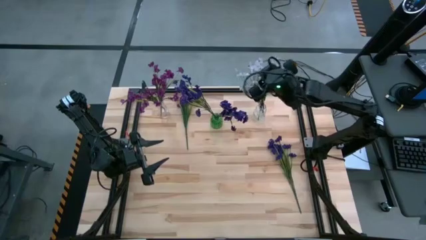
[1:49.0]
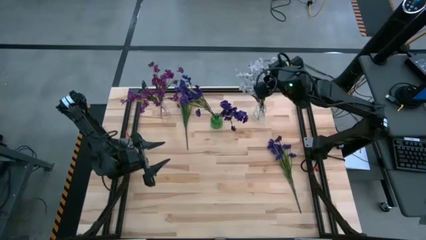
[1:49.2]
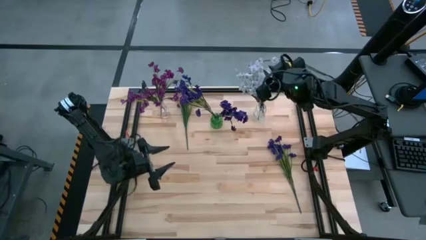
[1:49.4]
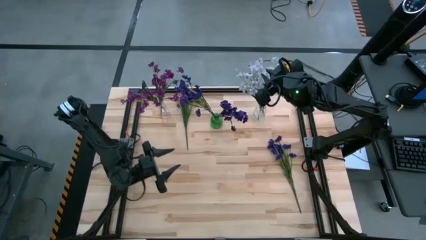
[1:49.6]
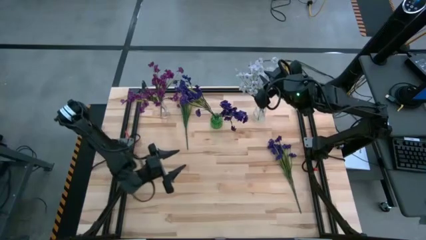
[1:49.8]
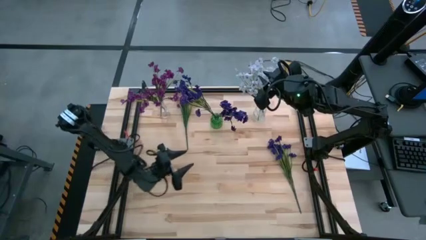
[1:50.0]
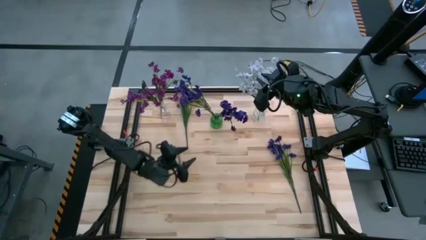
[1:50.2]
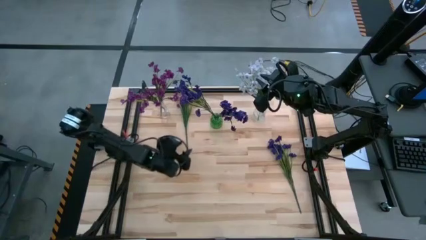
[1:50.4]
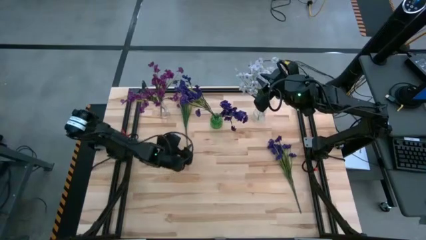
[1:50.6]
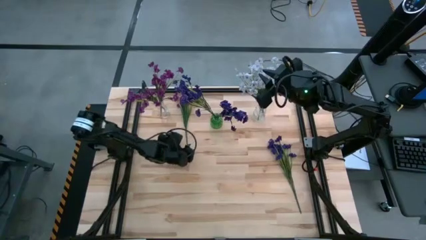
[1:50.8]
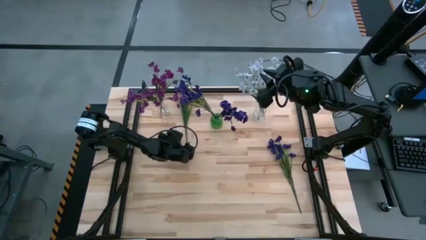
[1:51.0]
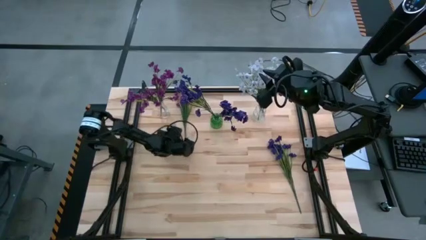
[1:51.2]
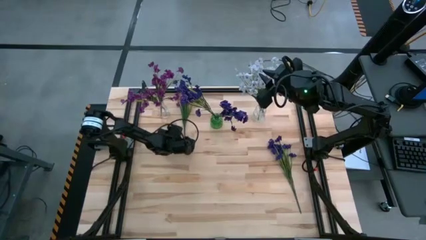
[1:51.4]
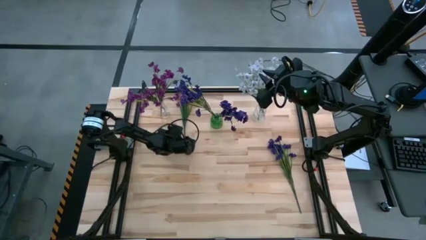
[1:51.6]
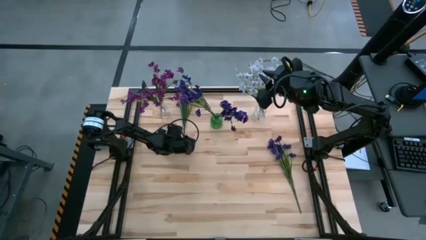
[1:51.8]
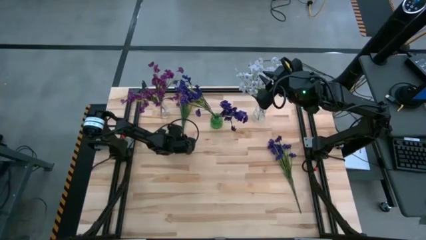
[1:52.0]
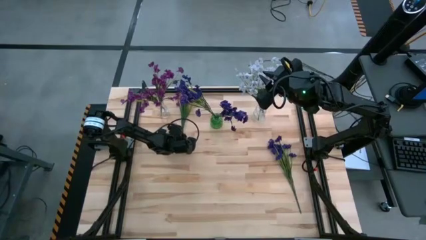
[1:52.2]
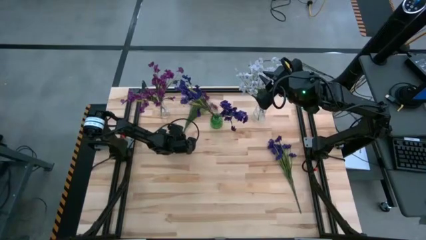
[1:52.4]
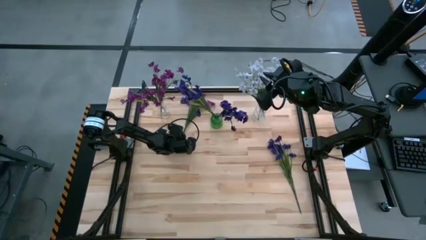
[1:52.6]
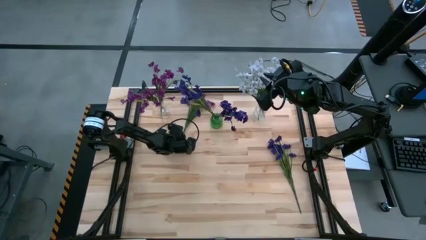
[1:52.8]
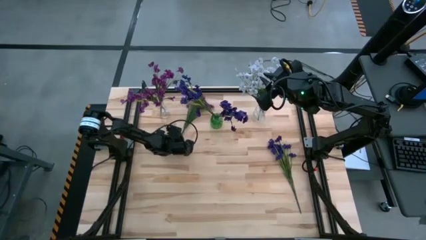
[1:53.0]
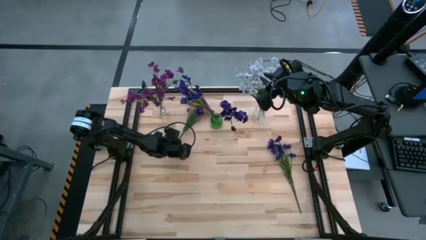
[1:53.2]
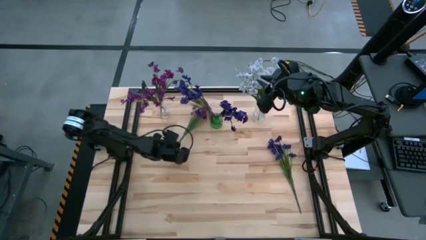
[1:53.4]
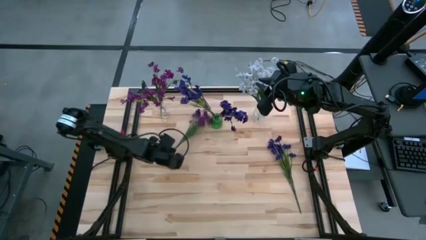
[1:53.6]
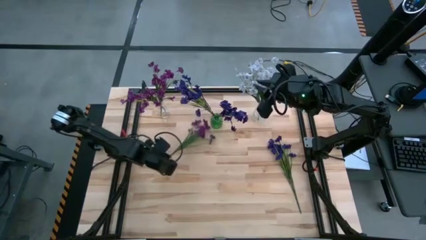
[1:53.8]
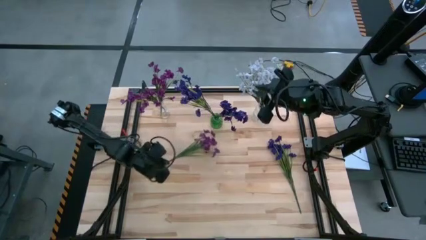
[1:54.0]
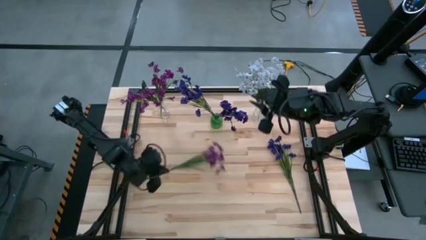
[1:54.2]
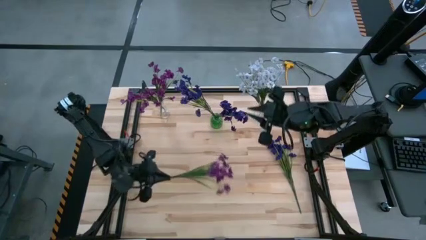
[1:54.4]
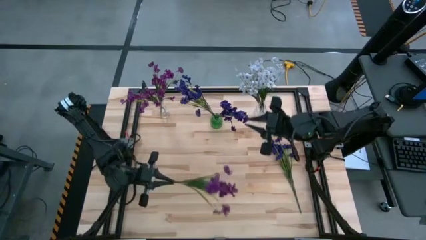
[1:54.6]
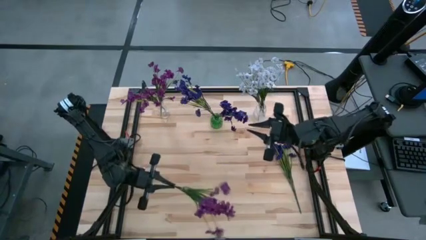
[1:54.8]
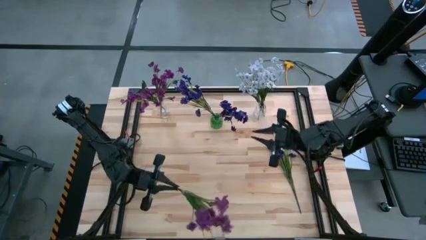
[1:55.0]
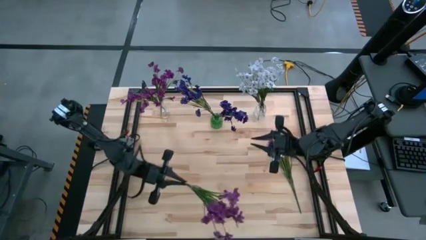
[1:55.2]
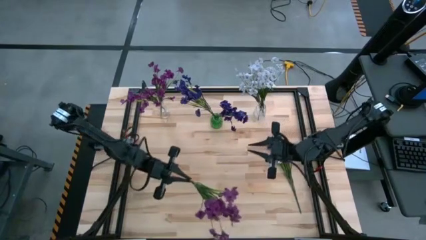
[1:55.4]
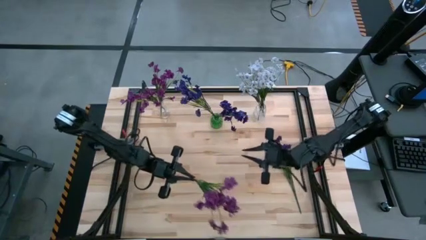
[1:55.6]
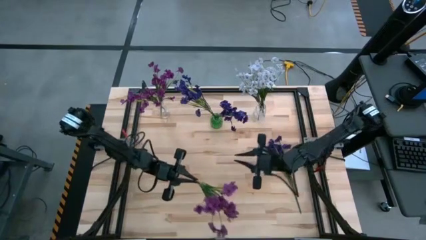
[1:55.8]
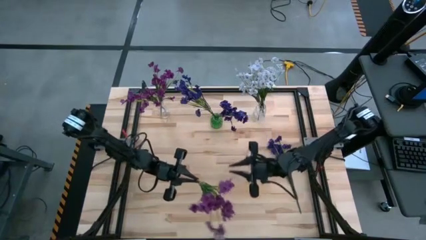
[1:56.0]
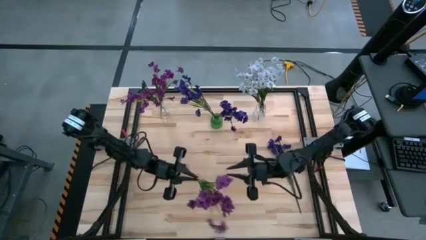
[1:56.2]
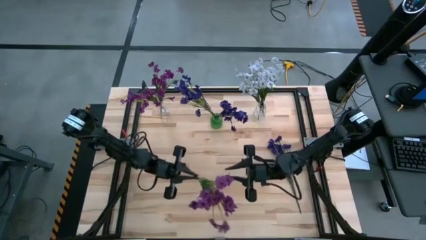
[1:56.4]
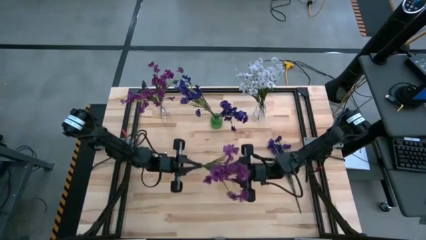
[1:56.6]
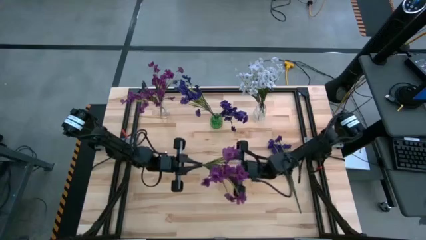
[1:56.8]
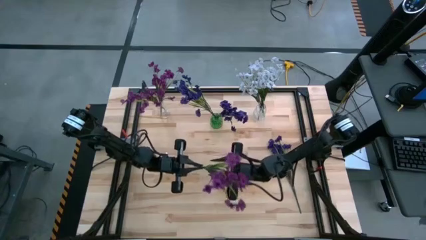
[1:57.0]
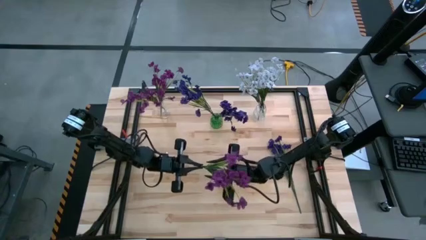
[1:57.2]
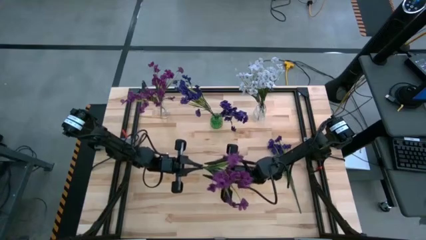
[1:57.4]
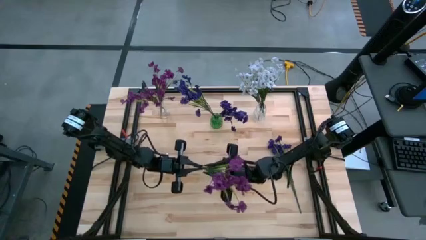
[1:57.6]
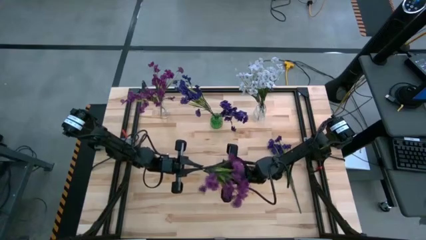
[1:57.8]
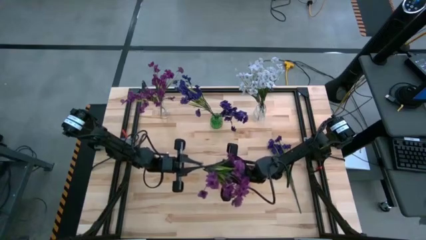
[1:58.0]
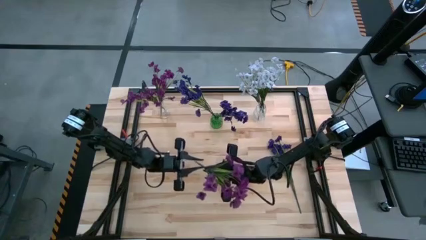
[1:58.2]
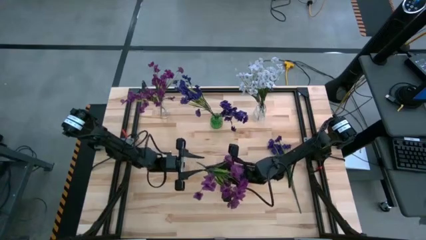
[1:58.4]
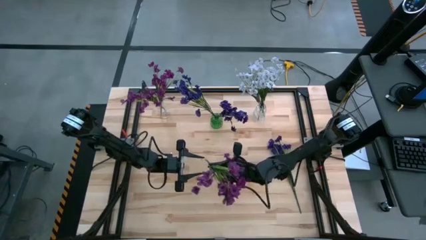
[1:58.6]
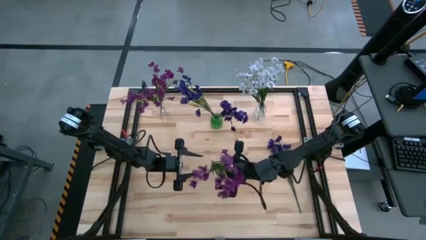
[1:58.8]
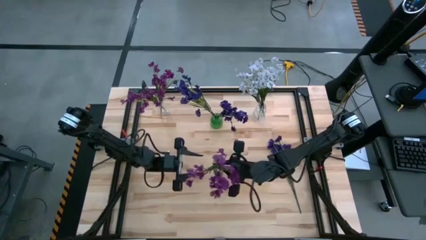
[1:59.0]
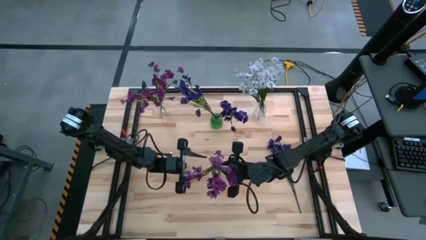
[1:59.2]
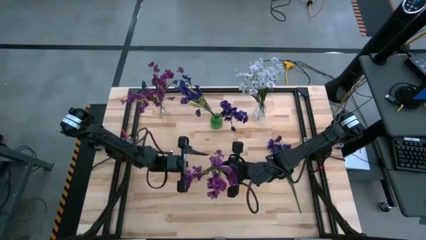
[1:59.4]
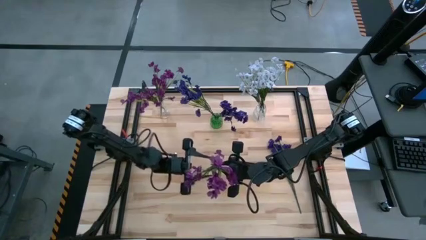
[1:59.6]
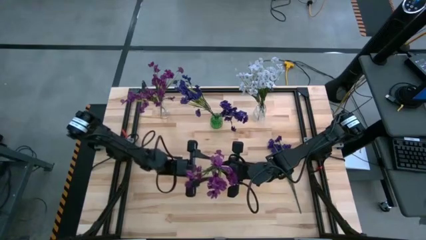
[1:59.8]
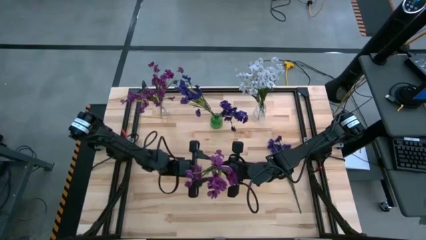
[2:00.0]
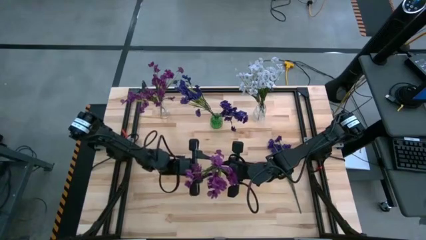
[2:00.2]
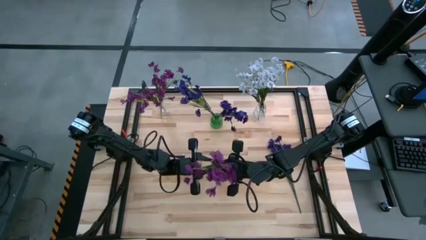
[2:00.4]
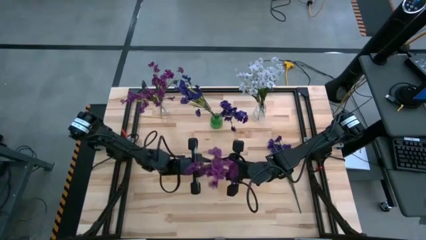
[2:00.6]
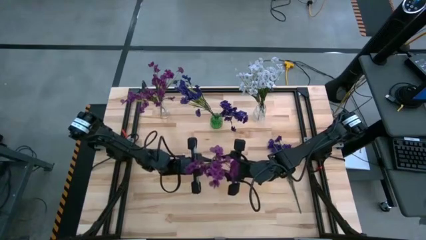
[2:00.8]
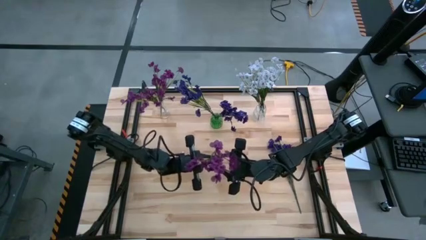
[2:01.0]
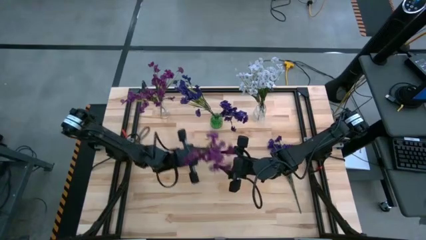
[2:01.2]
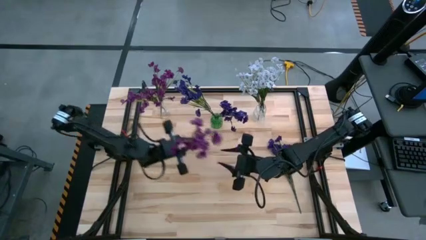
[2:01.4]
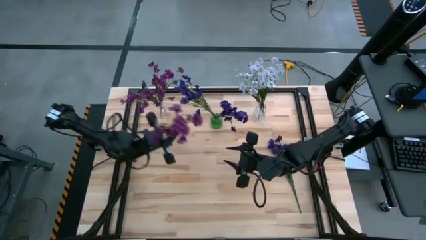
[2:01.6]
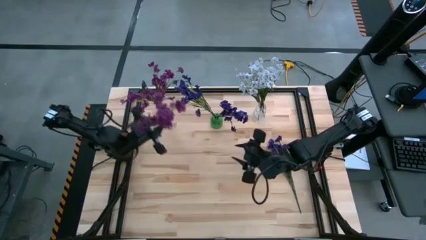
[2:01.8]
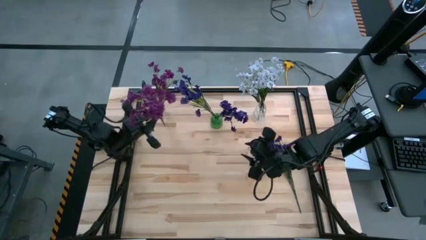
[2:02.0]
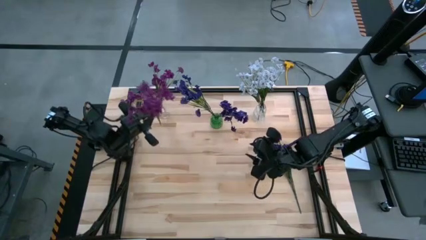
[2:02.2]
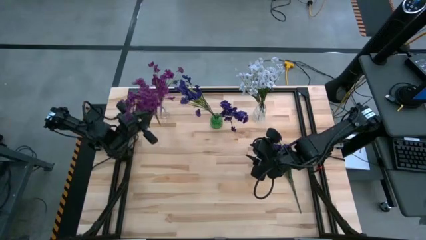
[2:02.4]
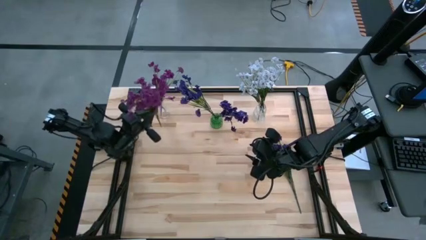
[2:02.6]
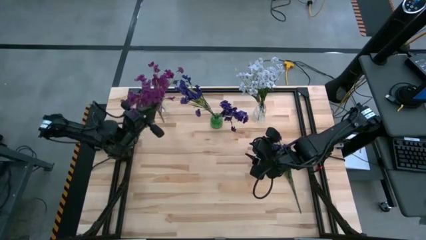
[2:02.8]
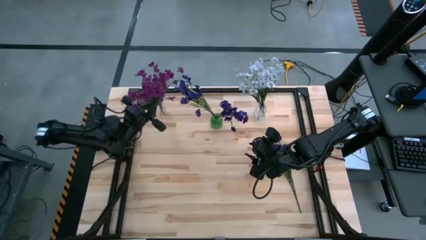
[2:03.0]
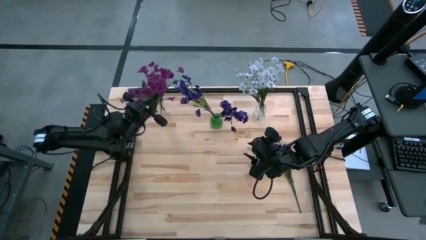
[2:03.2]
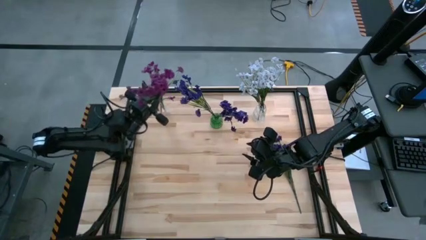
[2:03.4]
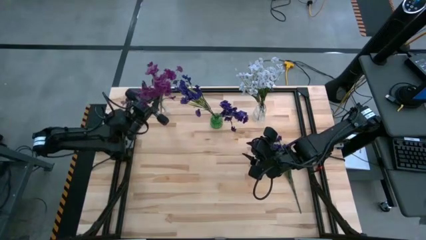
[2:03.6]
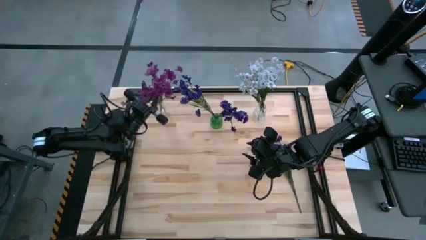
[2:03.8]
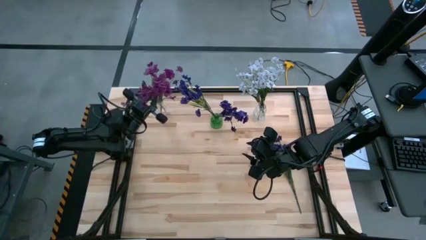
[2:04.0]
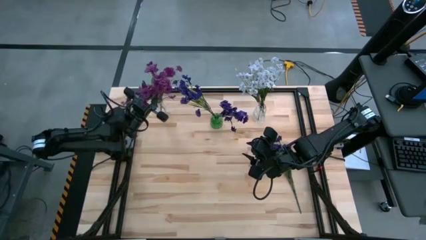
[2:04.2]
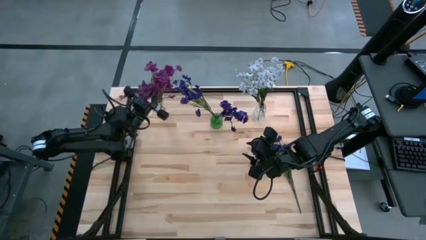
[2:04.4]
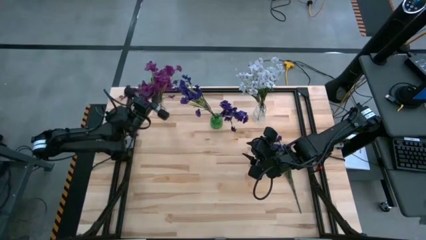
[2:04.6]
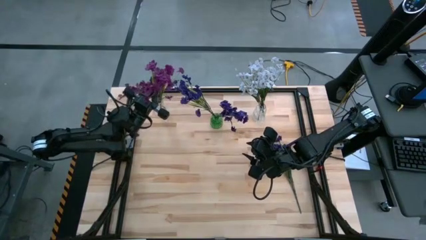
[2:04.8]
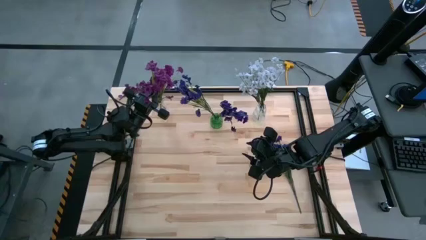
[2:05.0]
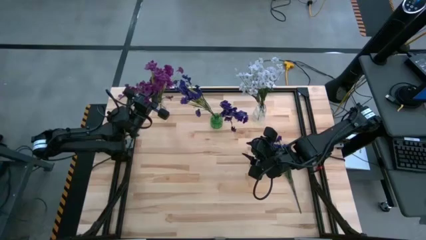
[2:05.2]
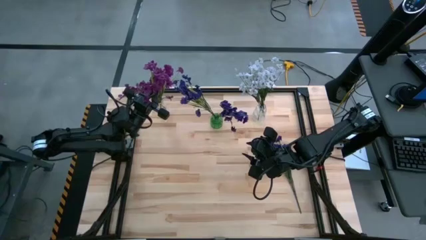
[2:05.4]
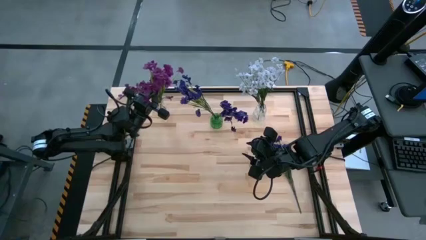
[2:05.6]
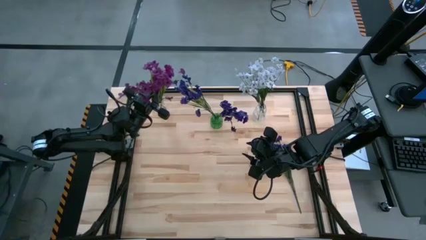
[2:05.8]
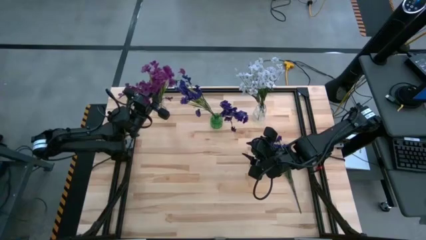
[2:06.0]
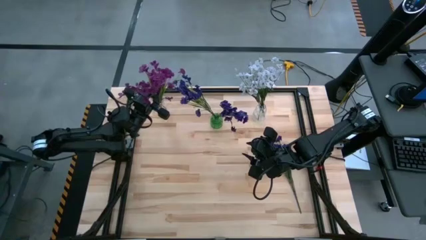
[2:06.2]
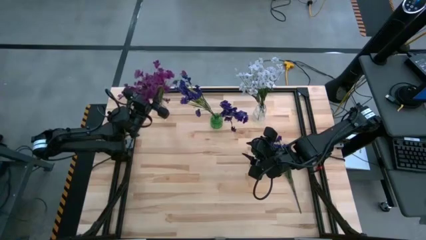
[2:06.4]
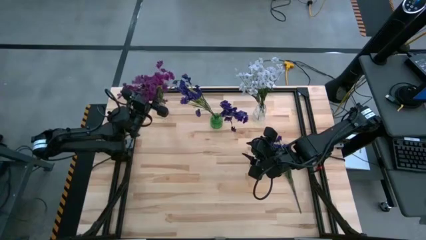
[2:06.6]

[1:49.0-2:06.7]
Task: Sort flowers into vase by color
Put the violet flowers into the left transparent flower vase
